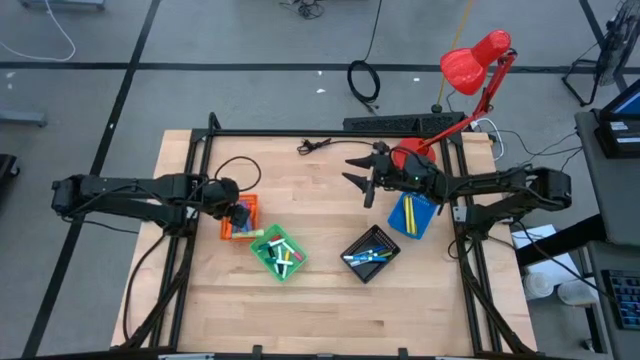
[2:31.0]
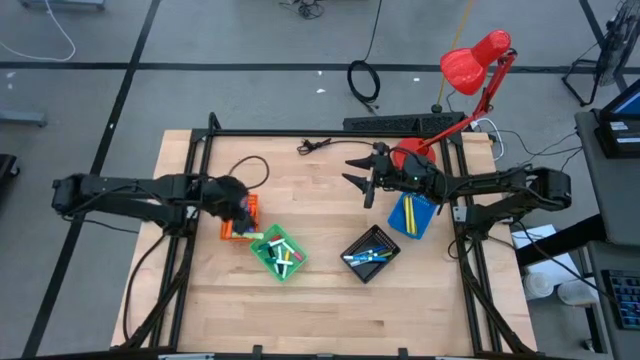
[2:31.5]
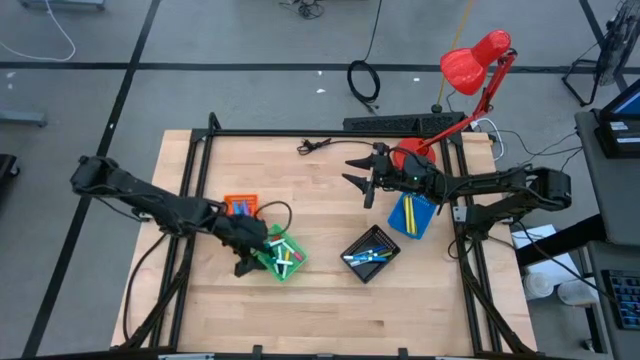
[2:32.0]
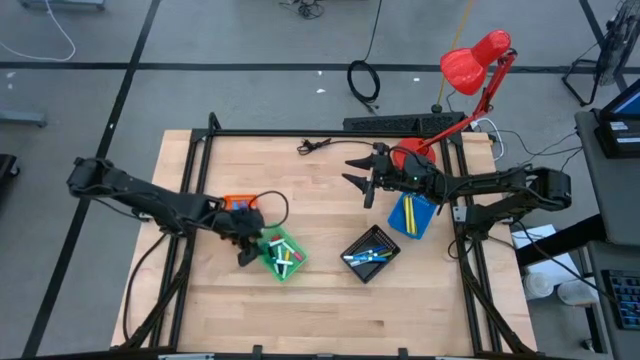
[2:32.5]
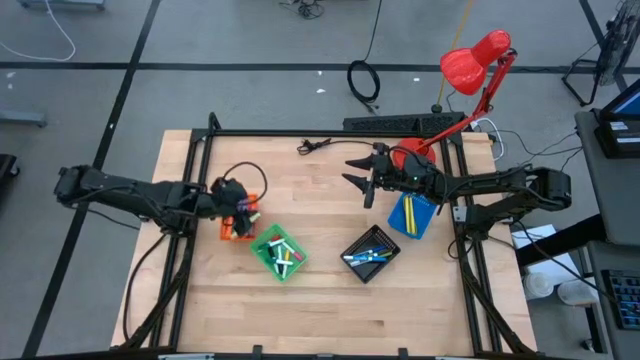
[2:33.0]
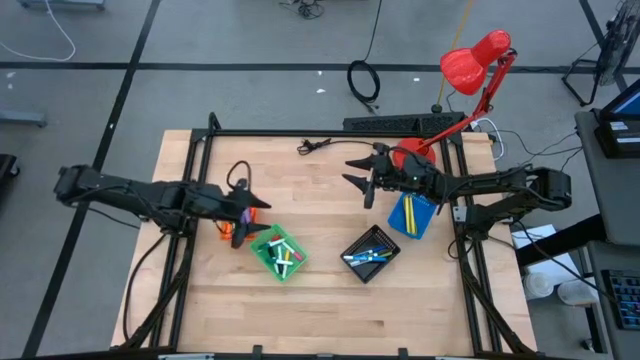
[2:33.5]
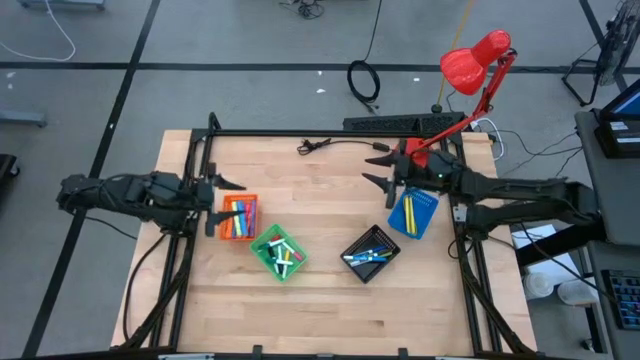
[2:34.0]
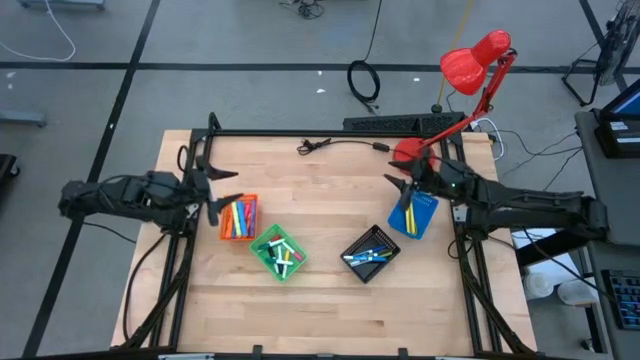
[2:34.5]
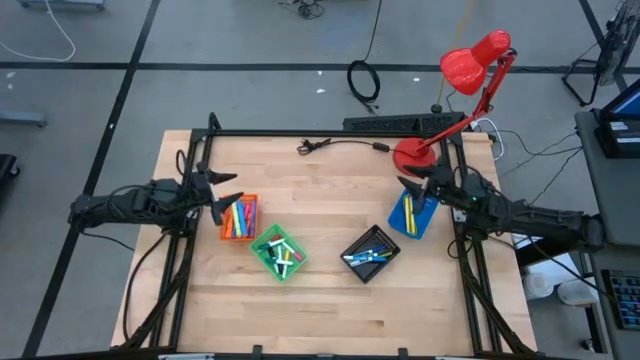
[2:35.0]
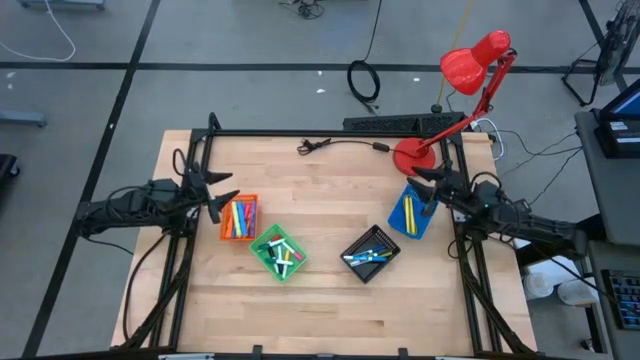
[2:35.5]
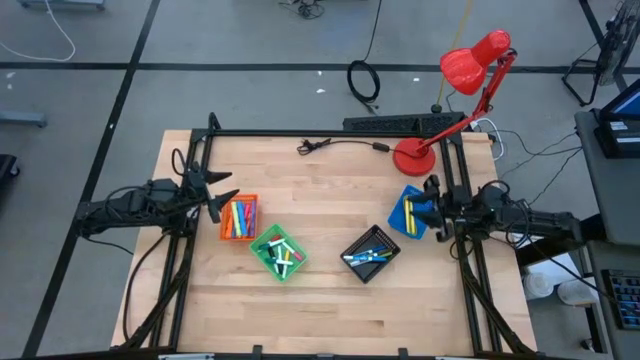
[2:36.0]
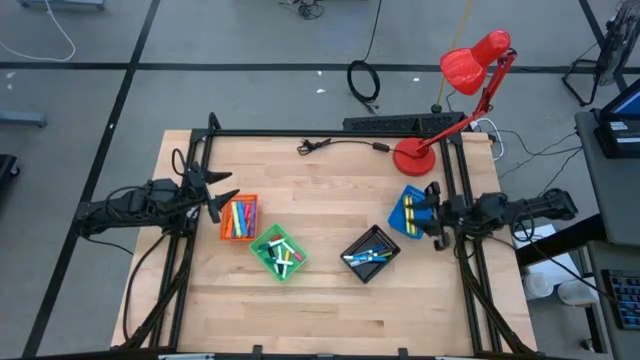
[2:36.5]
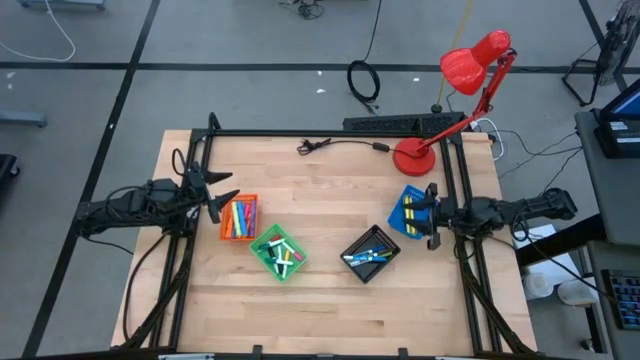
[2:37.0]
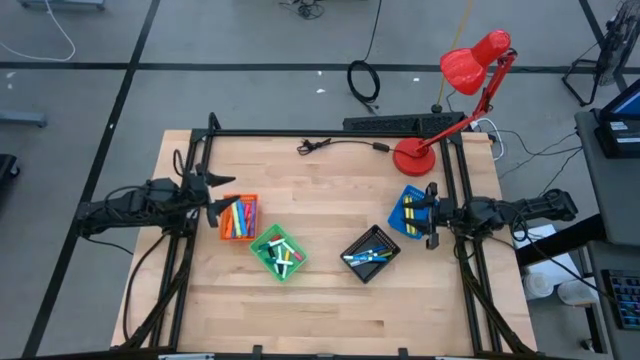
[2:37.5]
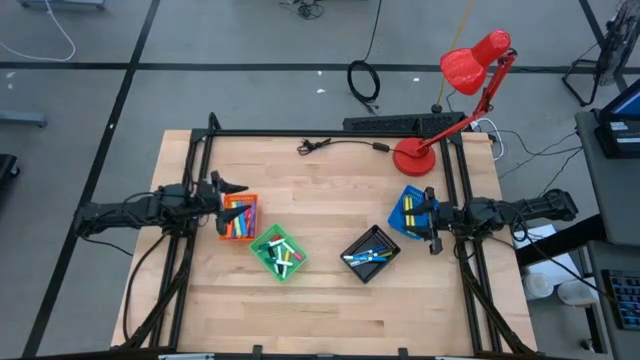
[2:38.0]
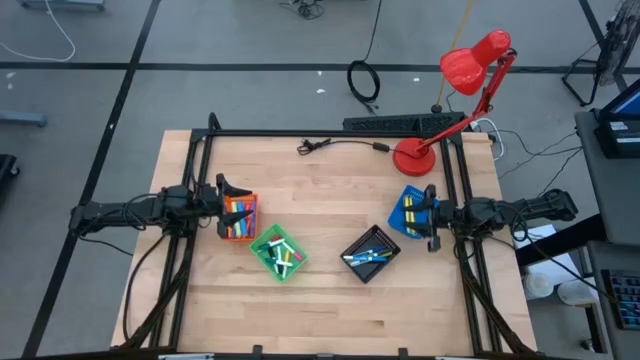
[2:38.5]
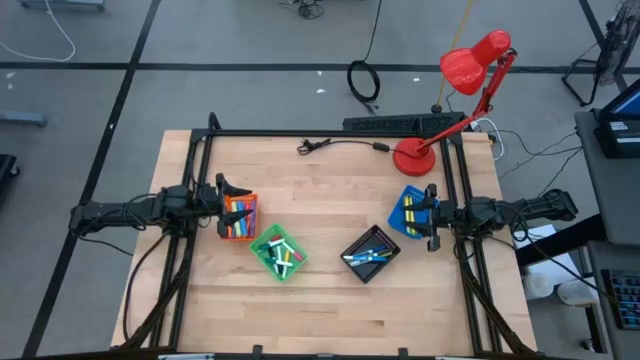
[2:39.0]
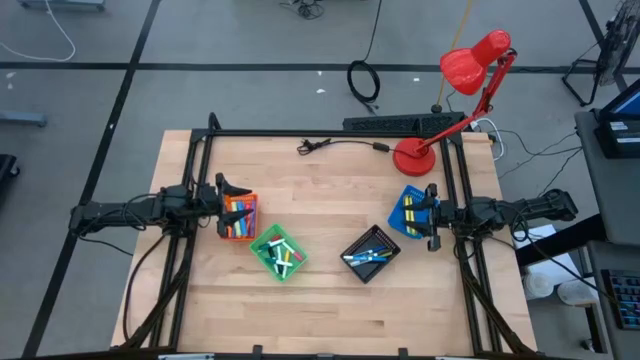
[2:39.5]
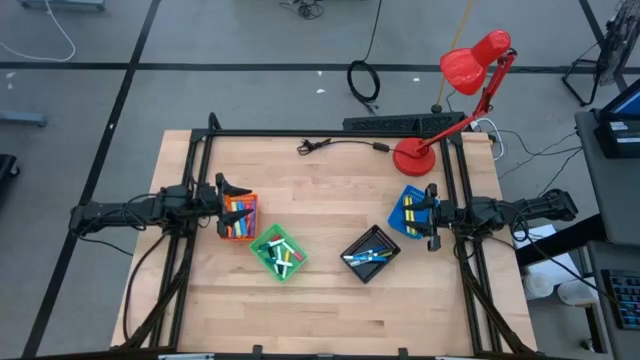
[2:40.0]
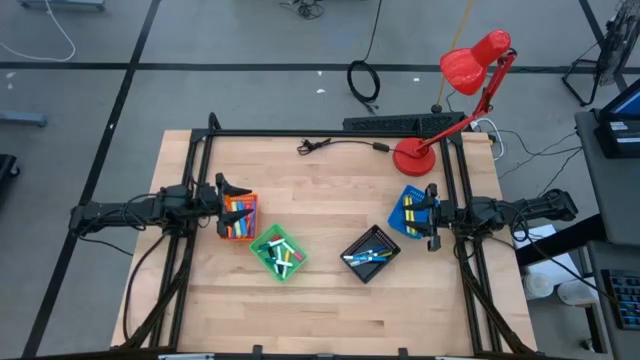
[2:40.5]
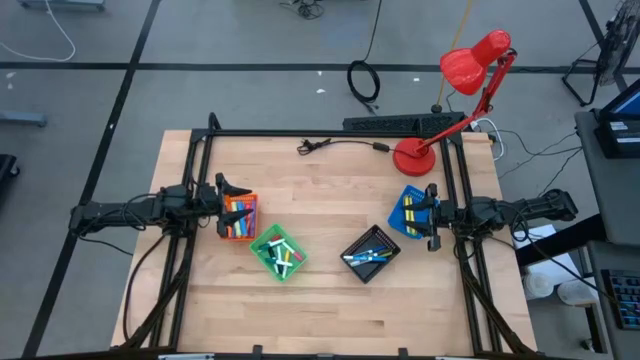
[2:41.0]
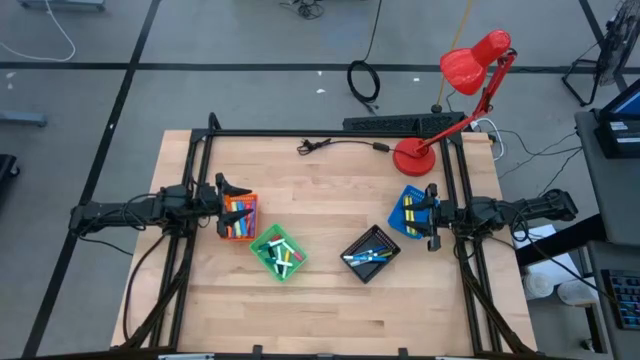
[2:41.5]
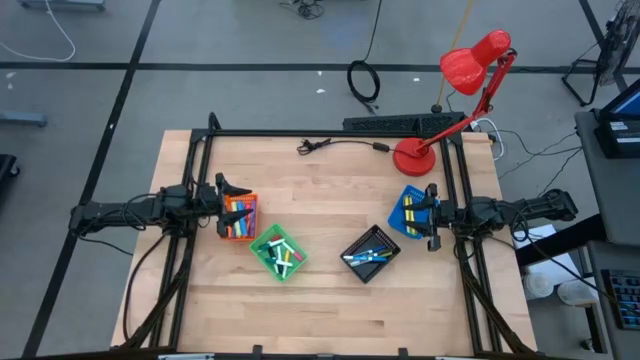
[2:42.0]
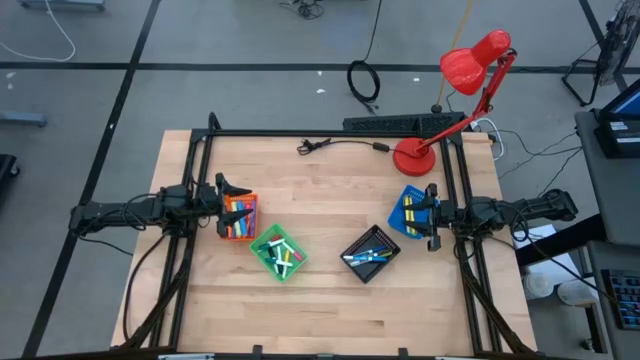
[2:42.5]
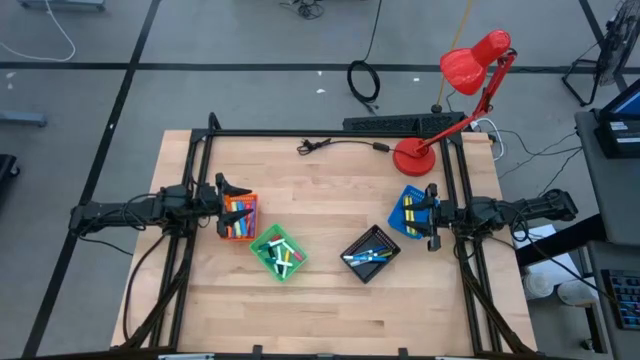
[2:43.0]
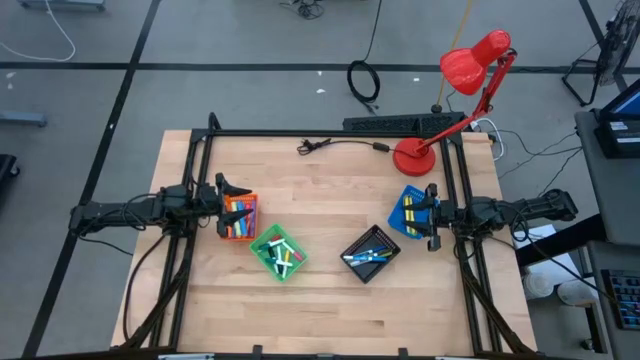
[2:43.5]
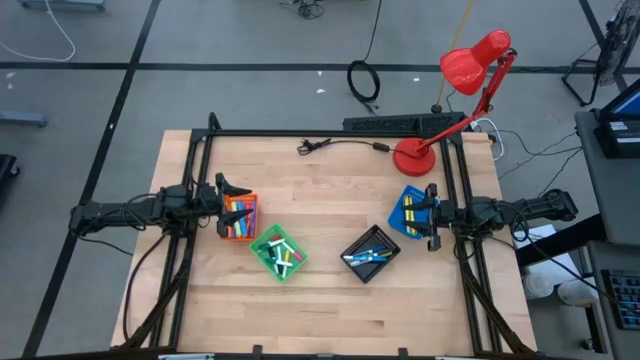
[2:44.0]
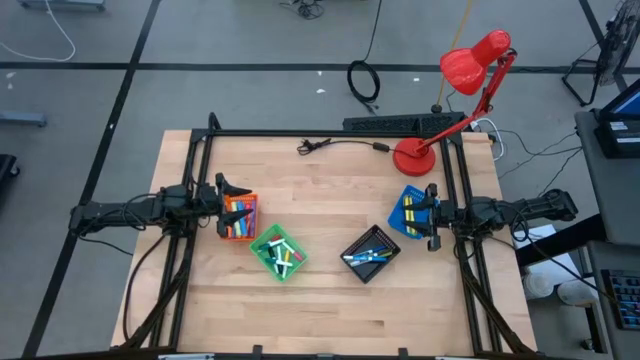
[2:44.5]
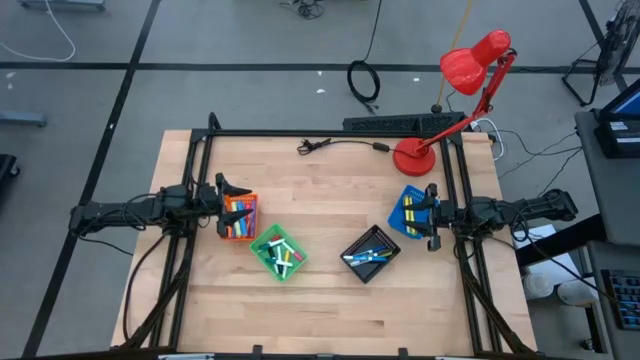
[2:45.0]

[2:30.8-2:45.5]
Task: Pick & Place Markers
Return to Home Position

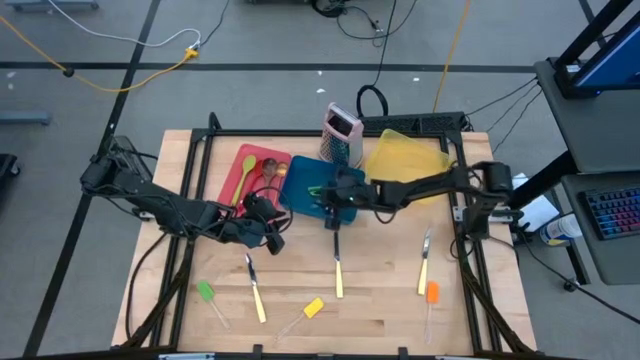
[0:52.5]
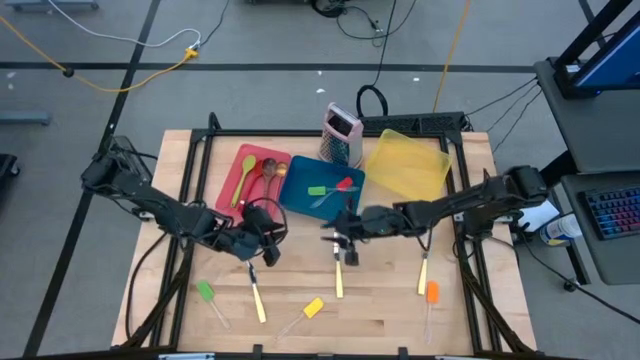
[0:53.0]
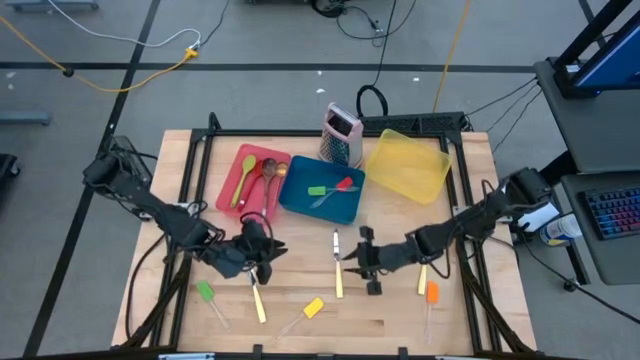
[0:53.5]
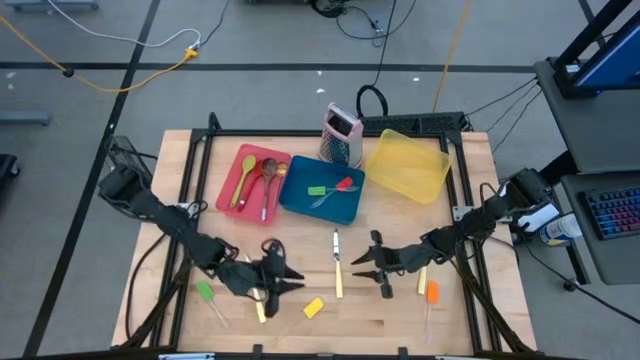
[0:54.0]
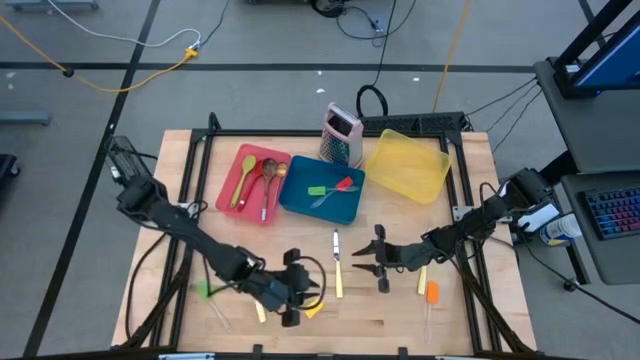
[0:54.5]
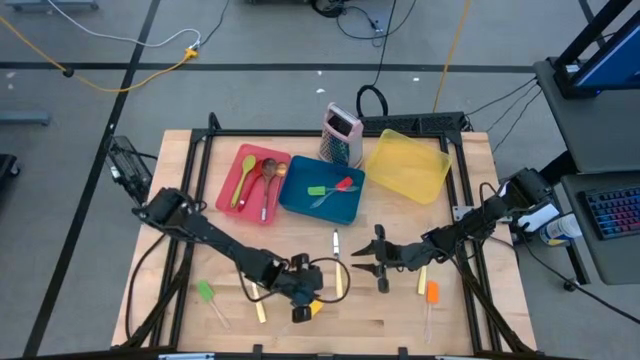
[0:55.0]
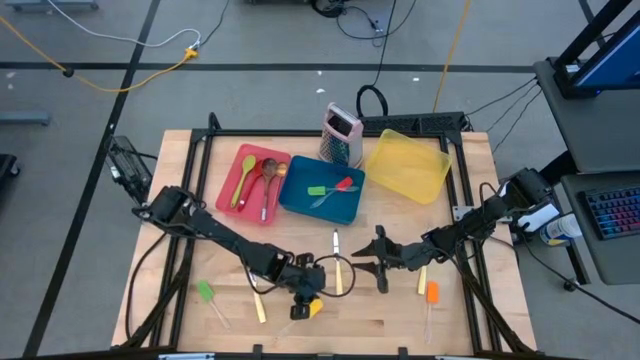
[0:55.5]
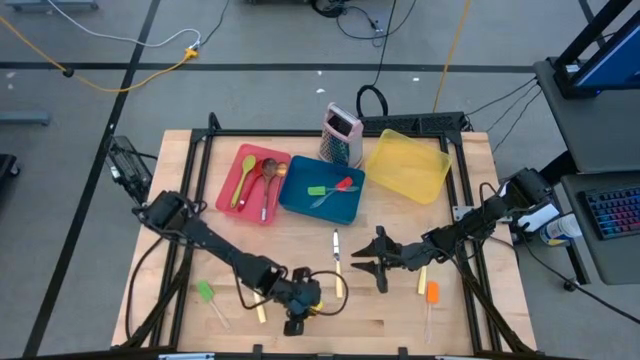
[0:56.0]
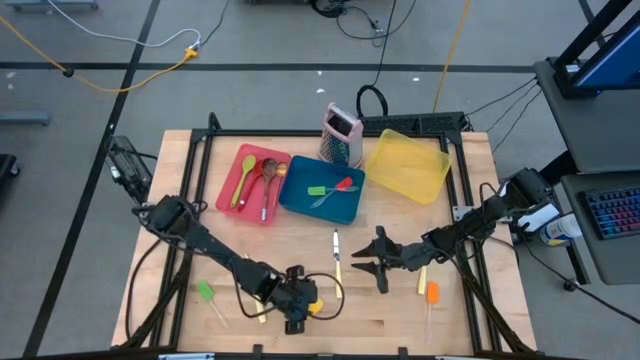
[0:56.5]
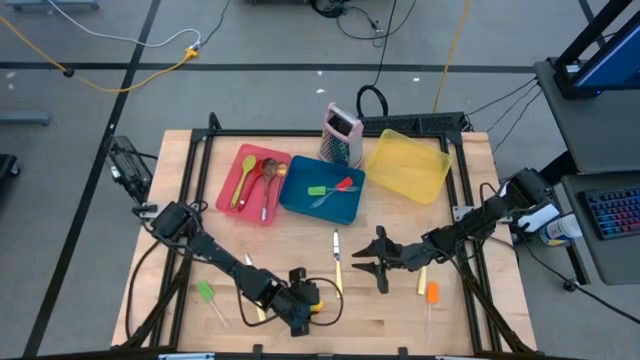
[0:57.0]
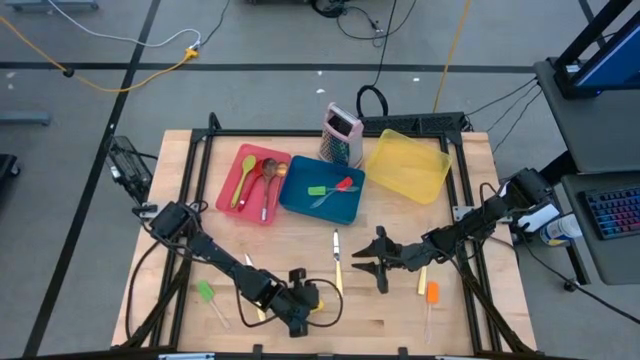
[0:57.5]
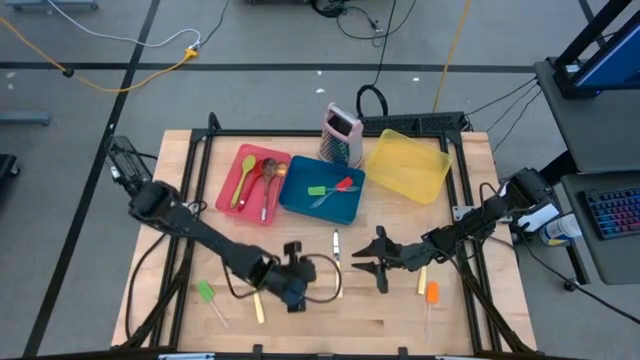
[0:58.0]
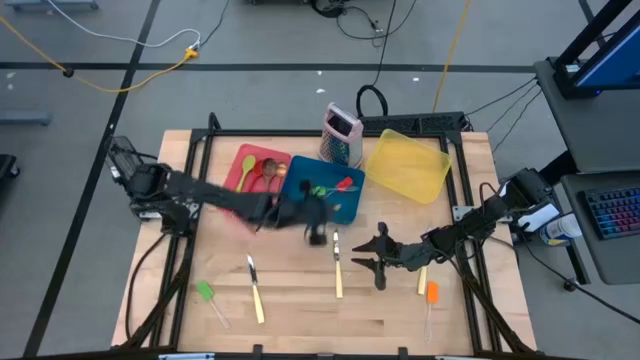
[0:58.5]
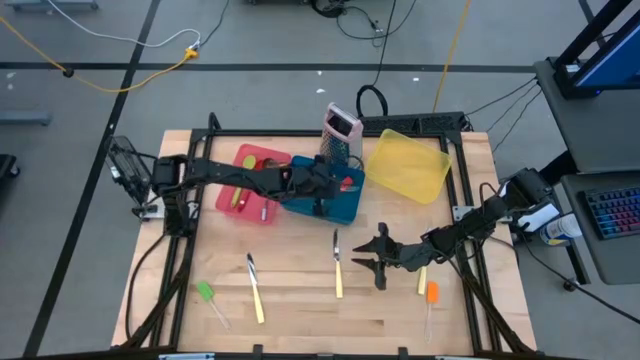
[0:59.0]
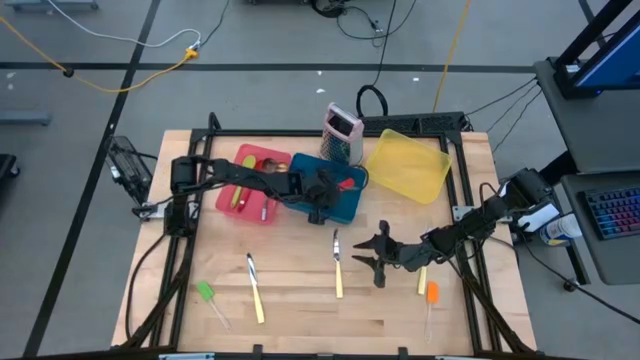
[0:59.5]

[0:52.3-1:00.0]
Task: Pick & Place Kitchen Items
Put the yellow spatula into the blue bin
